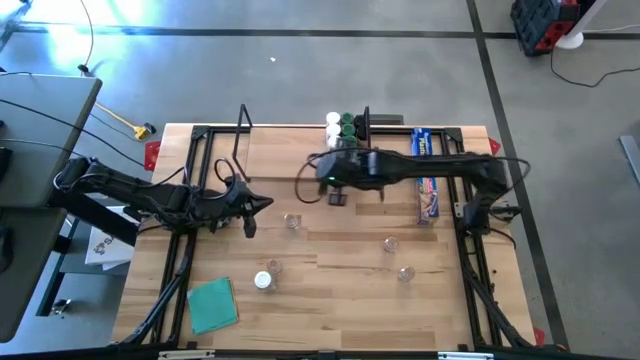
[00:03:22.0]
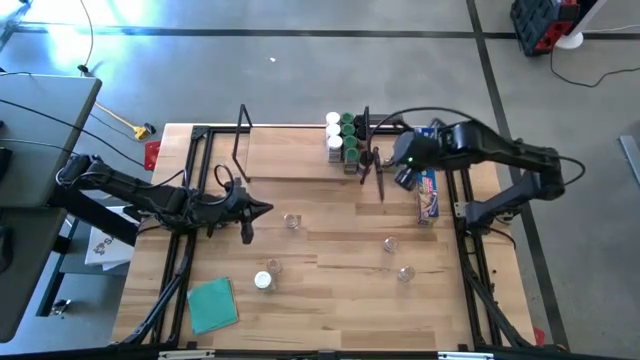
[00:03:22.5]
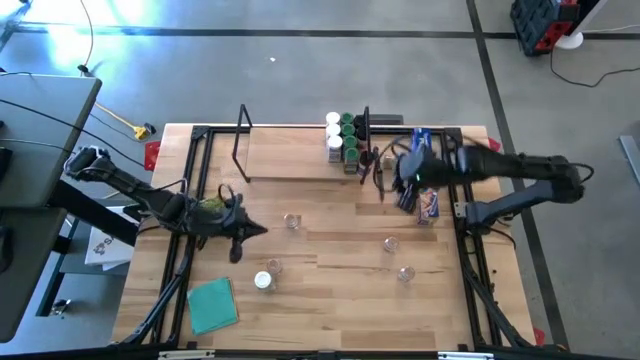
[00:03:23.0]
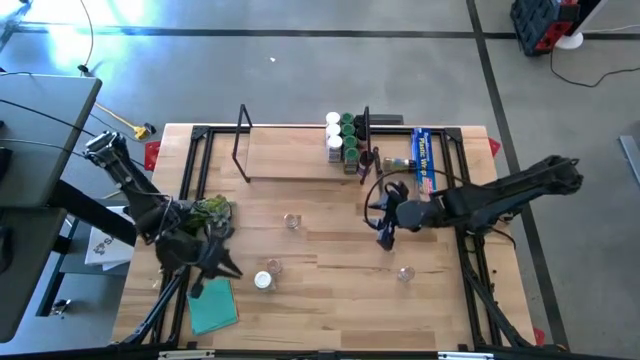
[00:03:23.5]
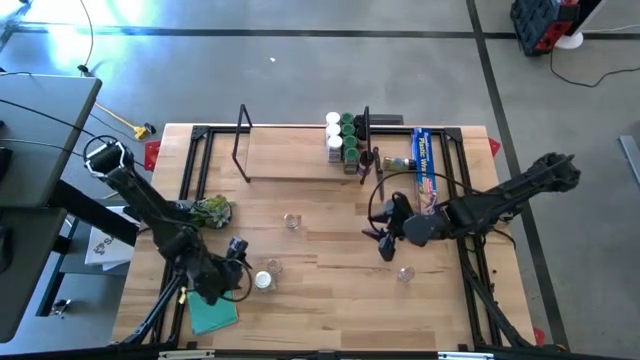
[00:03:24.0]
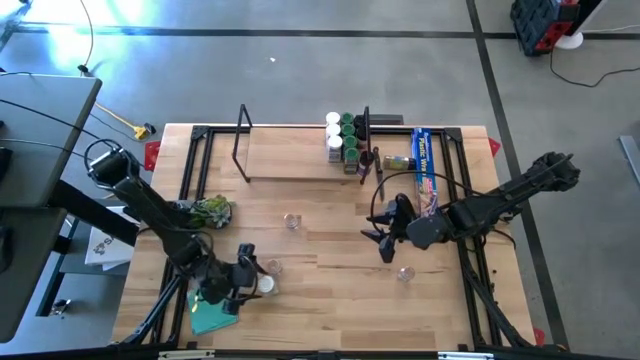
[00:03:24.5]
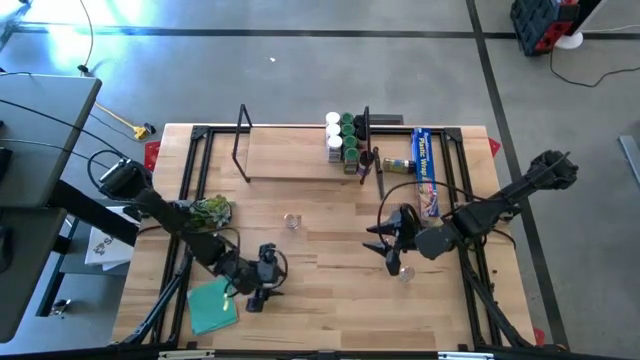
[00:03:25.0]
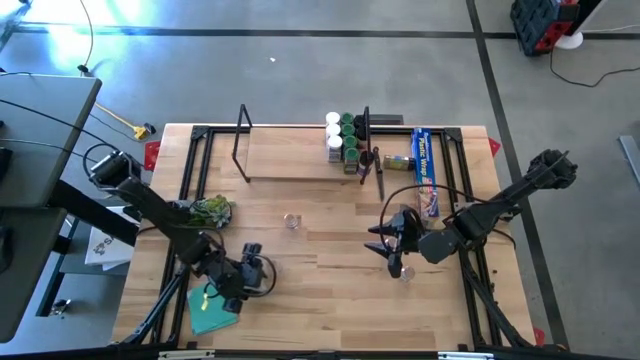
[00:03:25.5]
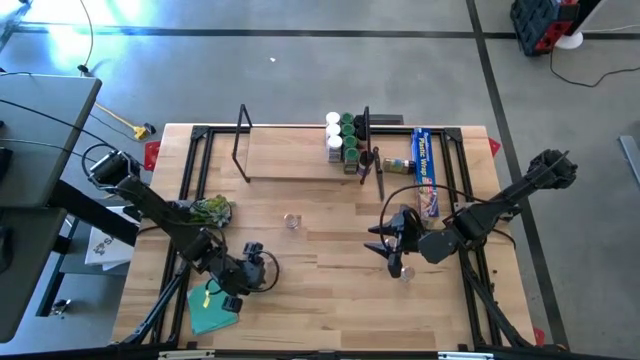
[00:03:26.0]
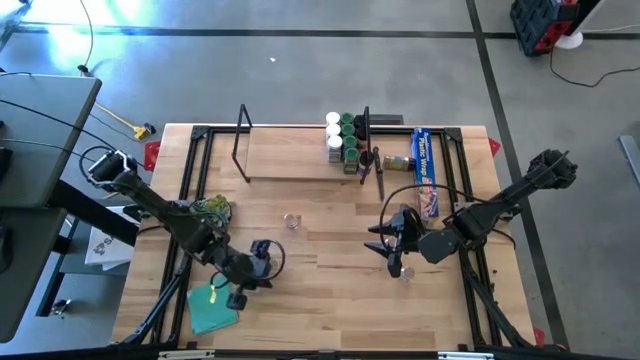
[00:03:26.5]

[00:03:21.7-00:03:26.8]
Task: Shelf spices
Put the white seasoning bottle on the shelf aligned with the other white seasoning bottles

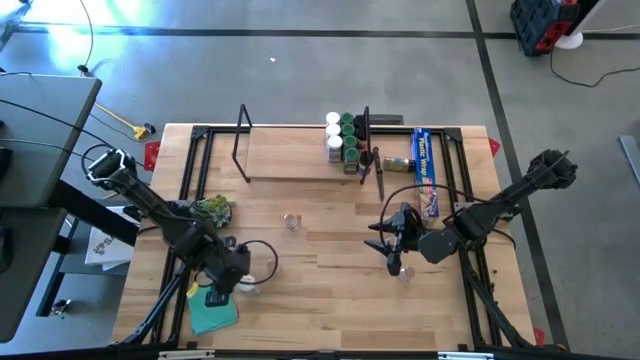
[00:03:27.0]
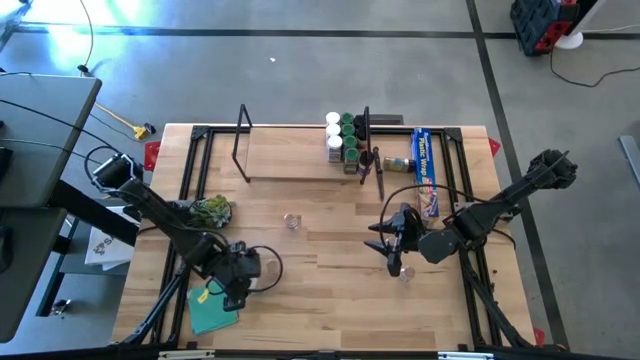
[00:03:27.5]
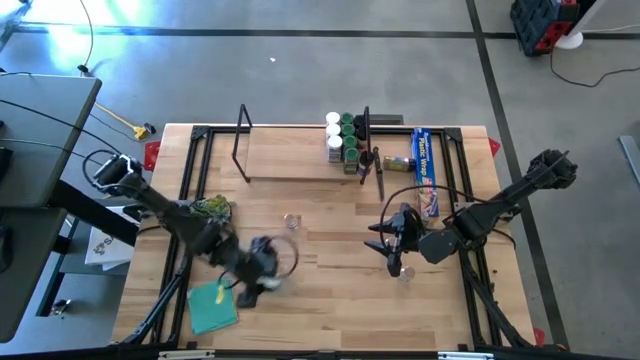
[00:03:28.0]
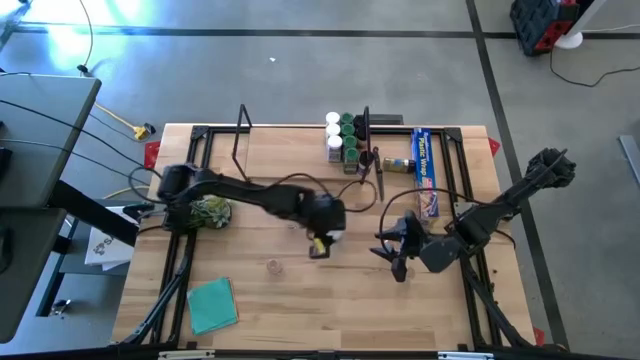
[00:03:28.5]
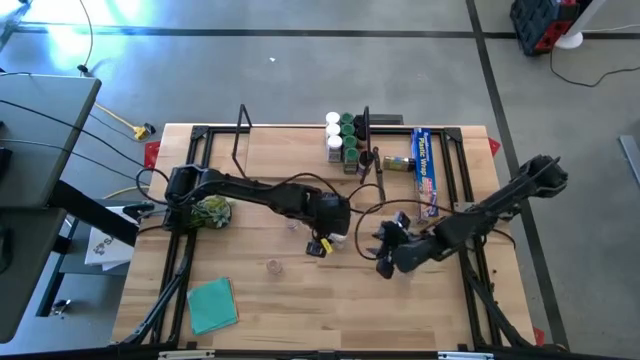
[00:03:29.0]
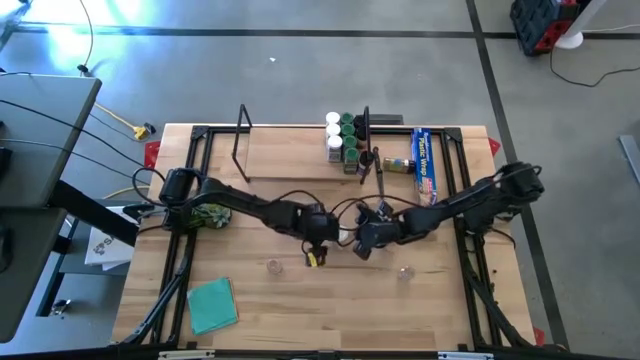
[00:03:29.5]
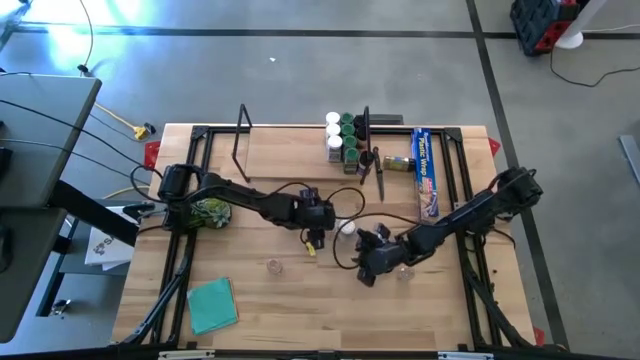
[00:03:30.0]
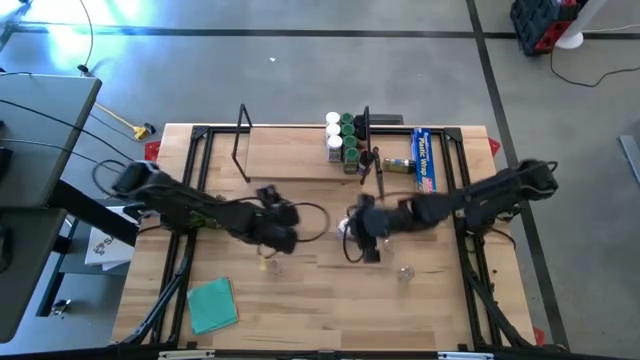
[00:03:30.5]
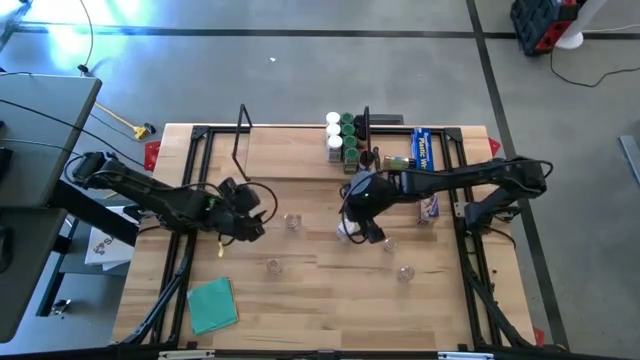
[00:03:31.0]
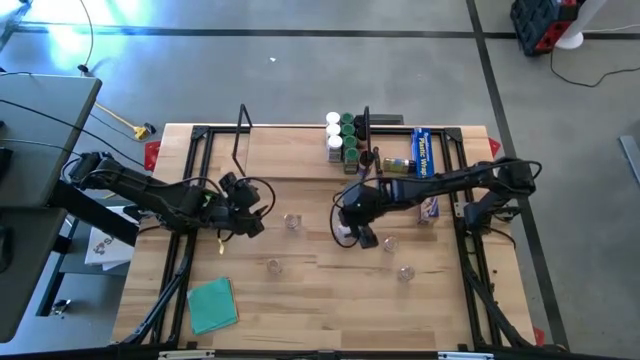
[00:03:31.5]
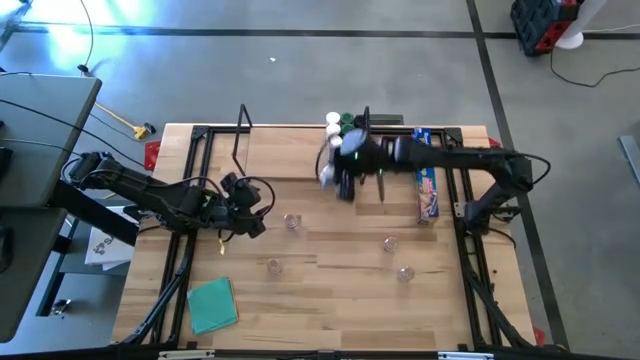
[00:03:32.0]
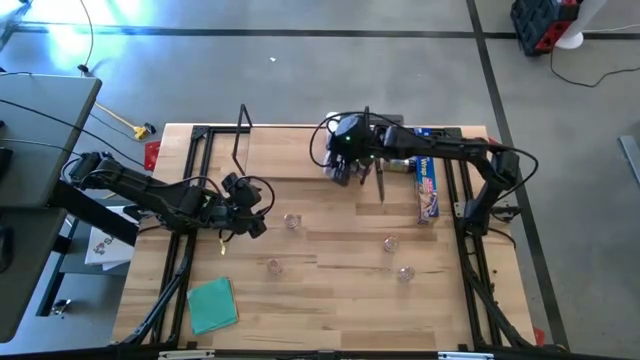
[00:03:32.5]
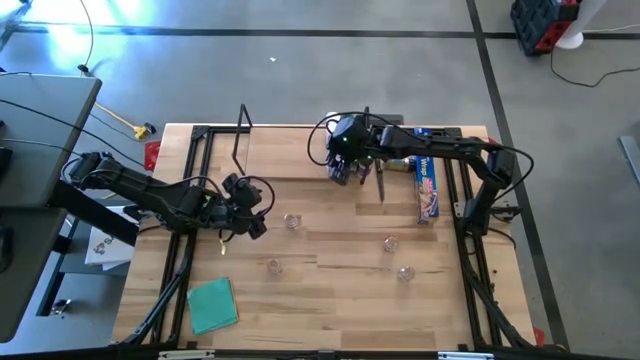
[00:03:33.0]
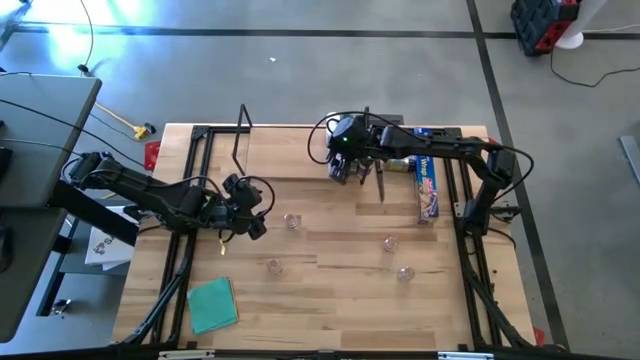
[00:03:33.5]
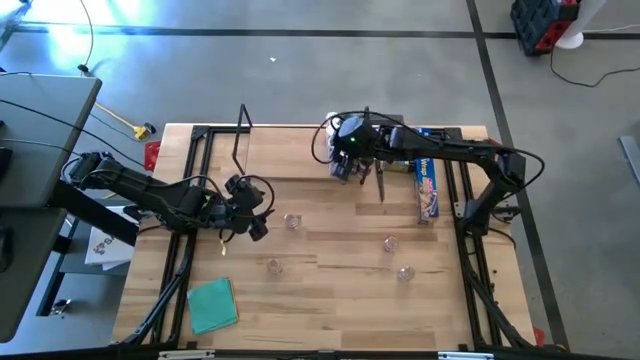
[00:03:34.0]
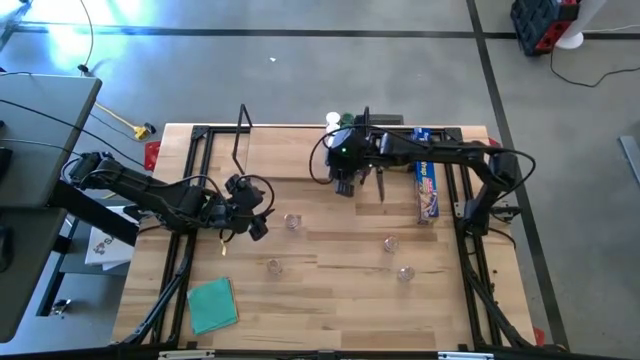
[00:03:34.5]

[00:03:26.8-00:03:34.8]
Put the white seasoning bottle on the shelf aligned with the other white seasoning bottles

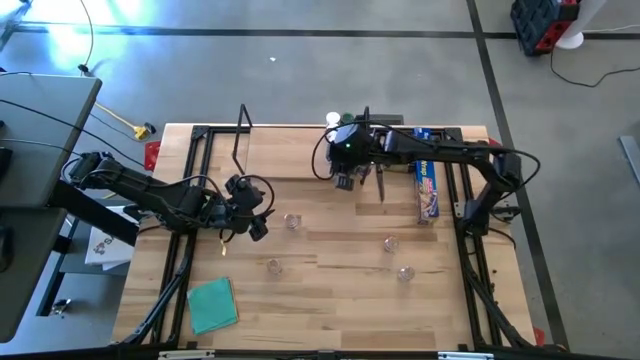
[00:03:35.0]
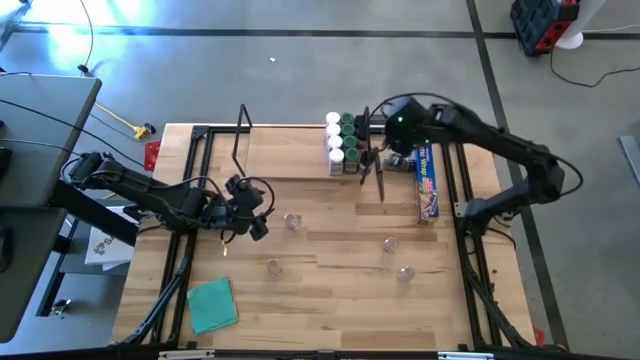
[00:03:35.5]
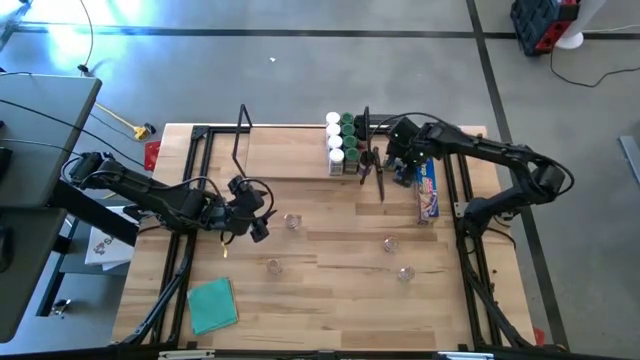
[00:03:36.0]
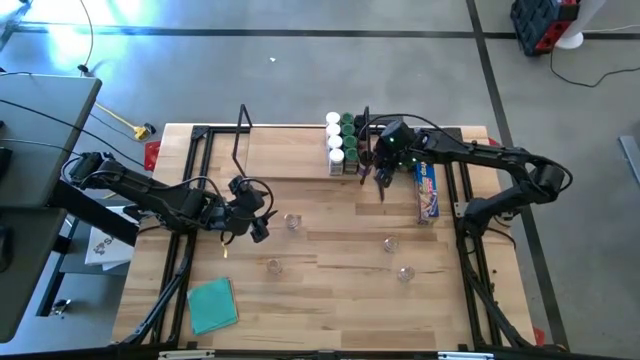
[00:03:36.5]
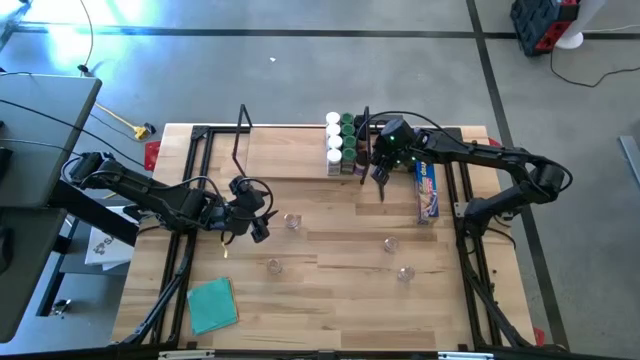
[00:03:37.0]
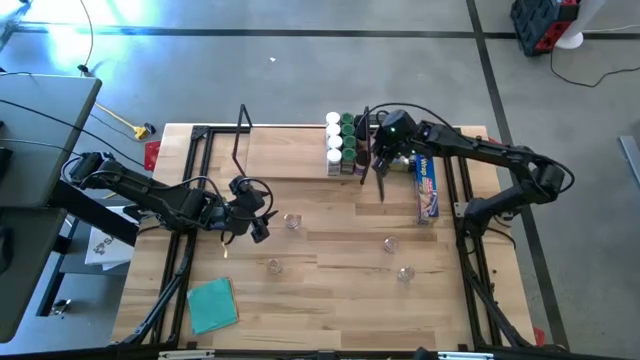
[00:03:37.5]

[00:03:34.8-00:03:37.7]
Adjust the black seasoning bottles on the shelf

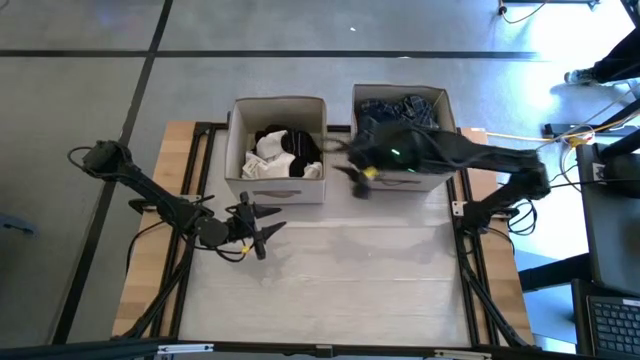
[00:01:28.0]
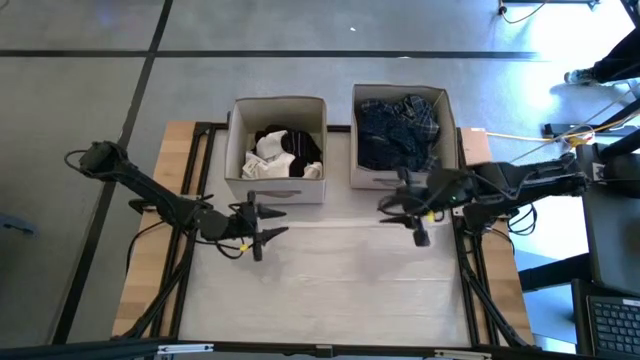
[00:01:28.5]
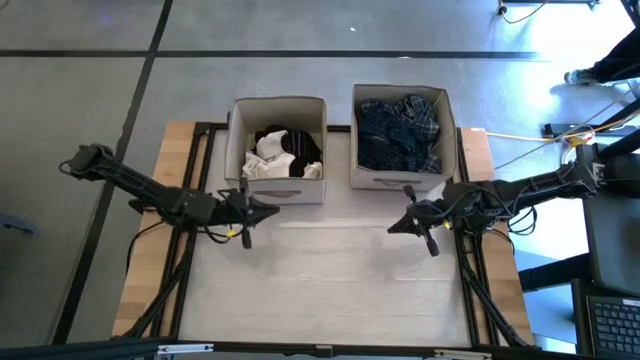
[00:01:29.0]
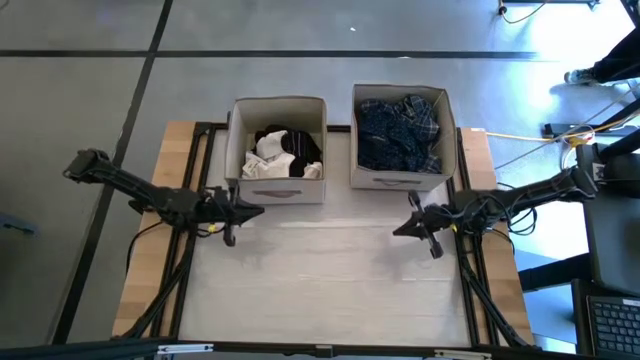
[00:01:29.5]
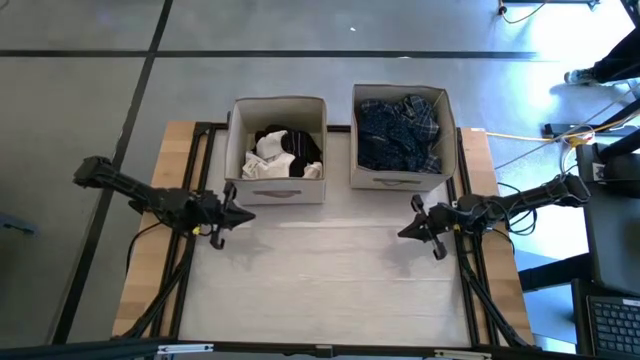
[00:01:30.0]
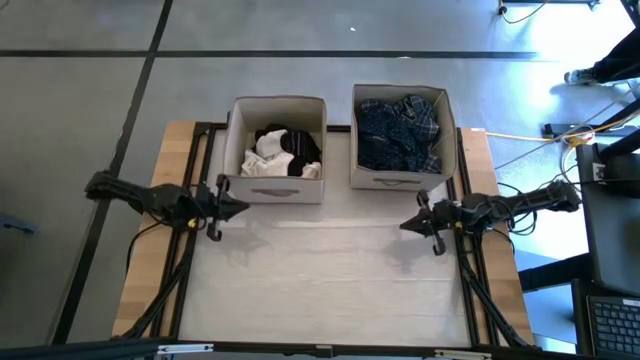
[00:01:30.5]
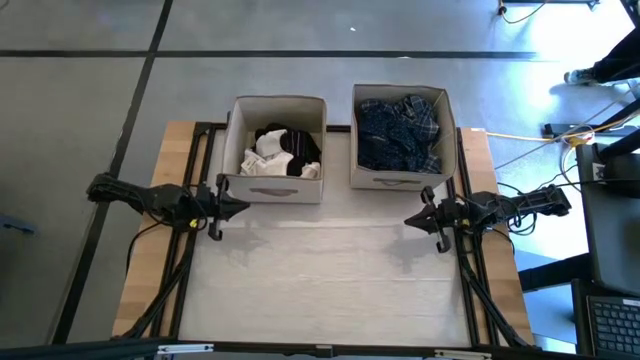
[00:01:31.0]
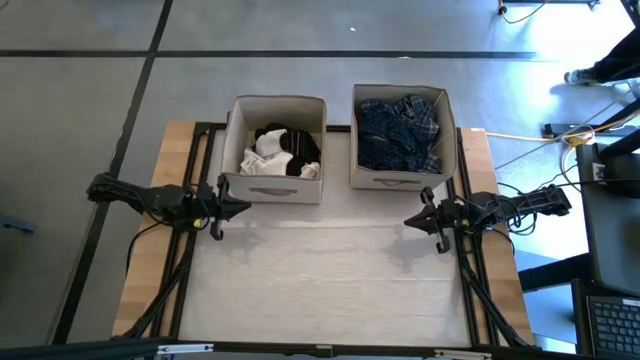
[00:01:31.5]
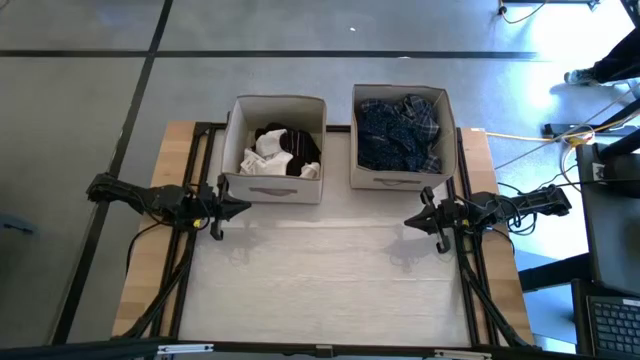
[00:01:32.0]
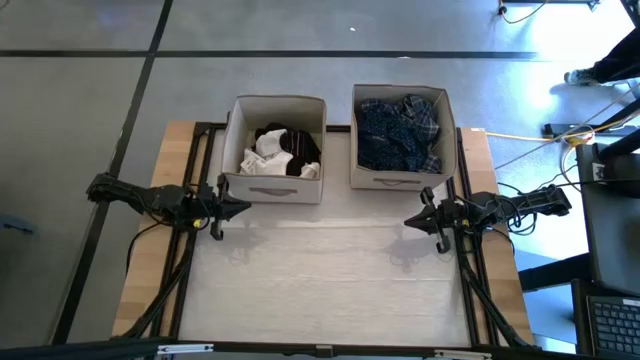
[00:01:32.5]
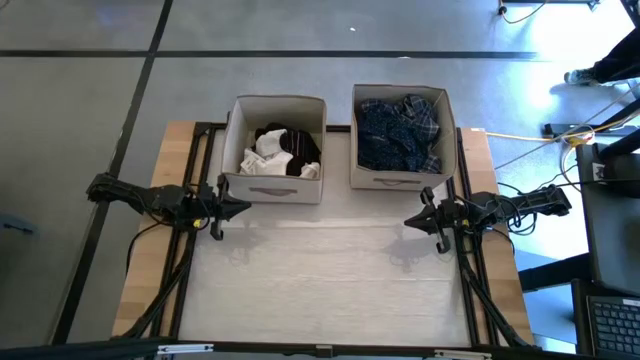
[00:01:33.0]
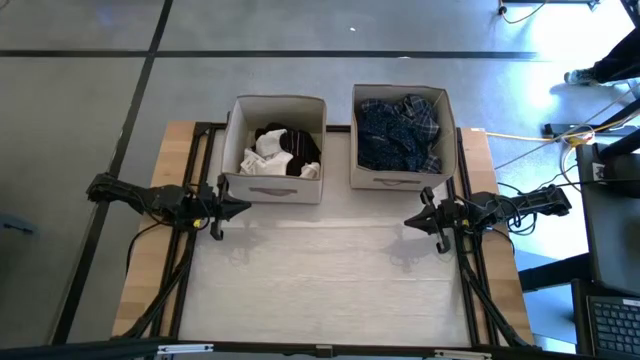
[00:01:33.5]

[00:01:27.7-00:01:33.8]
Task: Sort clothes
Return to Home Position
